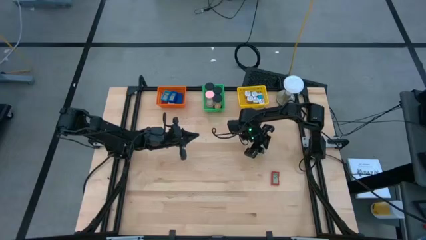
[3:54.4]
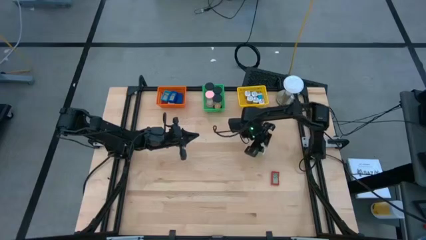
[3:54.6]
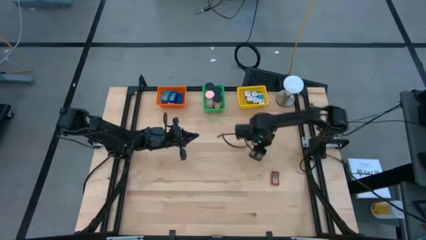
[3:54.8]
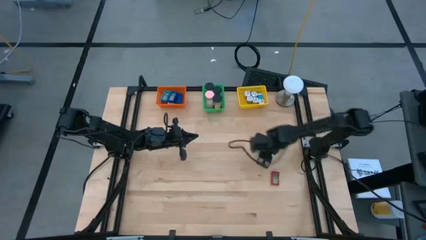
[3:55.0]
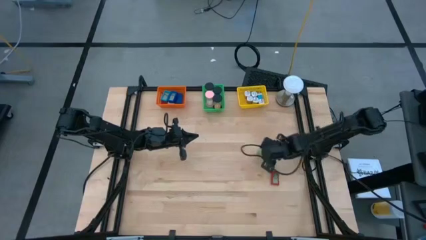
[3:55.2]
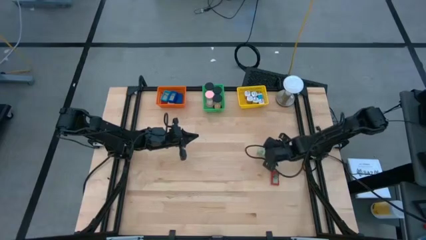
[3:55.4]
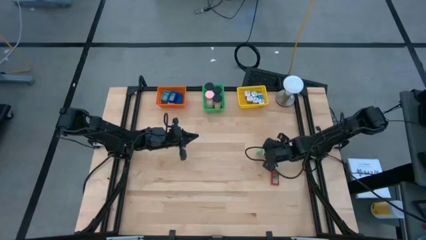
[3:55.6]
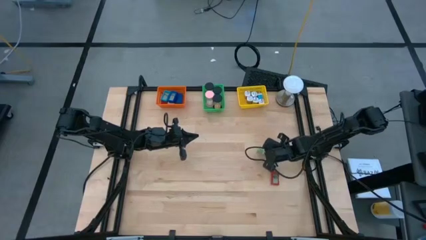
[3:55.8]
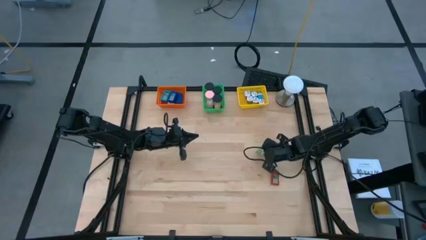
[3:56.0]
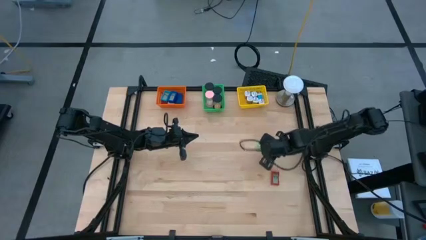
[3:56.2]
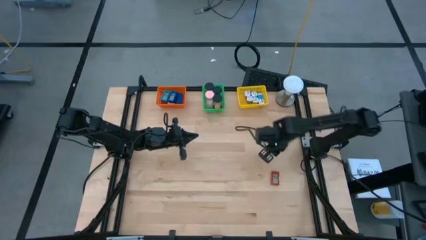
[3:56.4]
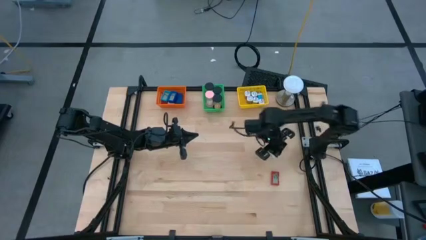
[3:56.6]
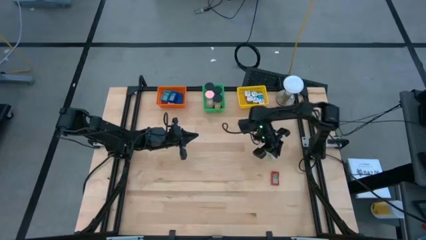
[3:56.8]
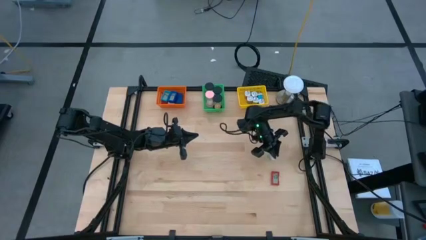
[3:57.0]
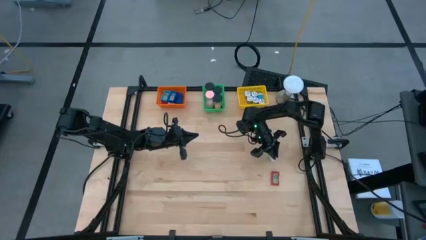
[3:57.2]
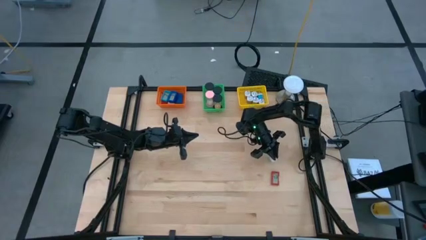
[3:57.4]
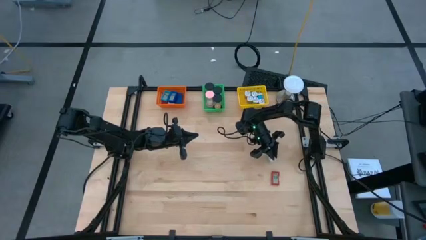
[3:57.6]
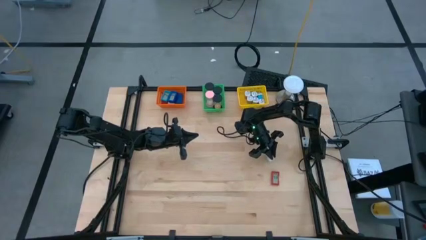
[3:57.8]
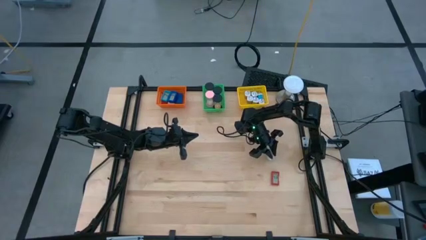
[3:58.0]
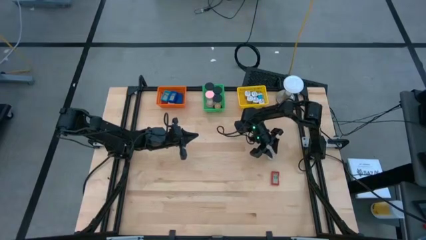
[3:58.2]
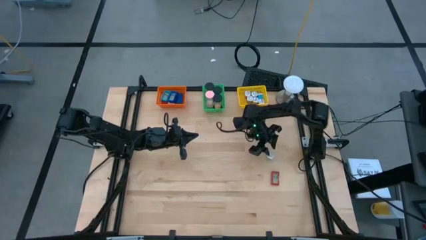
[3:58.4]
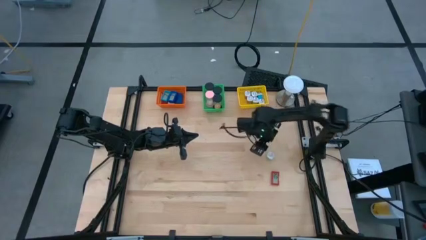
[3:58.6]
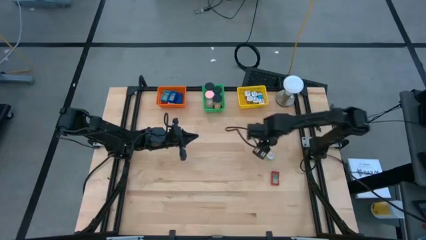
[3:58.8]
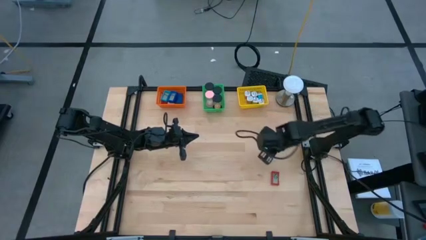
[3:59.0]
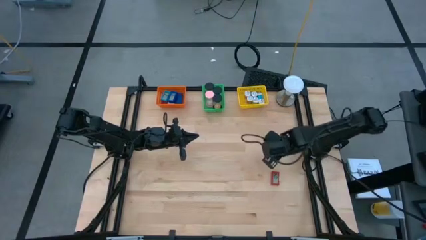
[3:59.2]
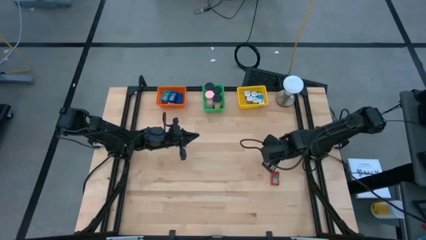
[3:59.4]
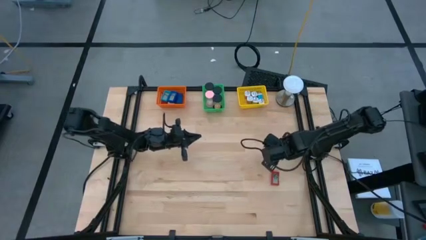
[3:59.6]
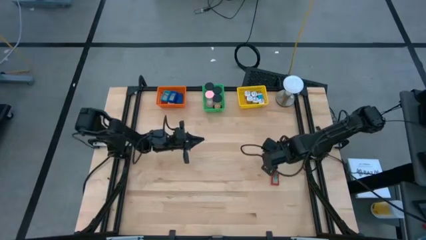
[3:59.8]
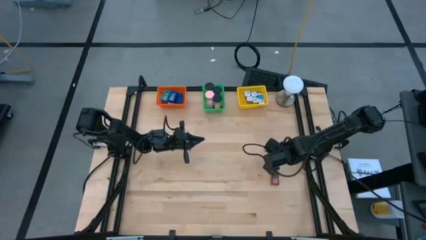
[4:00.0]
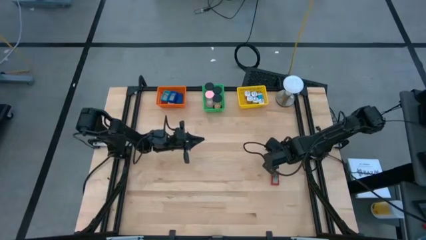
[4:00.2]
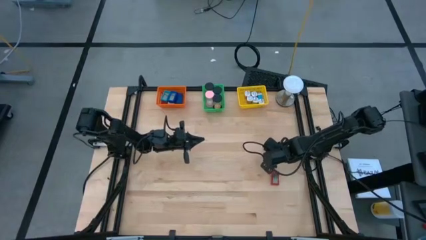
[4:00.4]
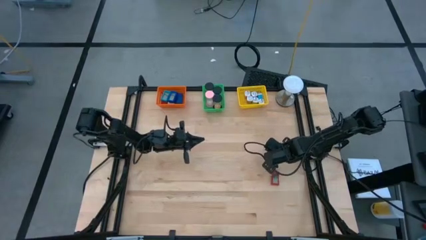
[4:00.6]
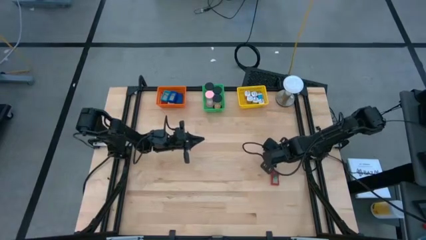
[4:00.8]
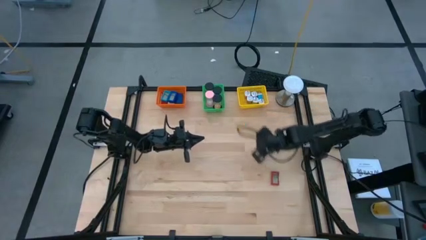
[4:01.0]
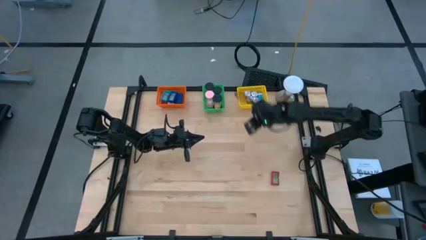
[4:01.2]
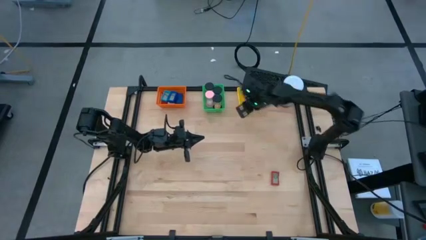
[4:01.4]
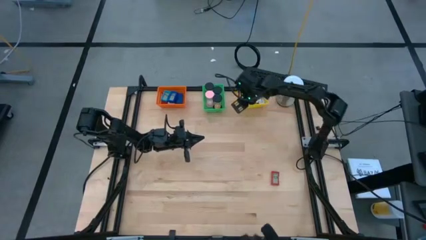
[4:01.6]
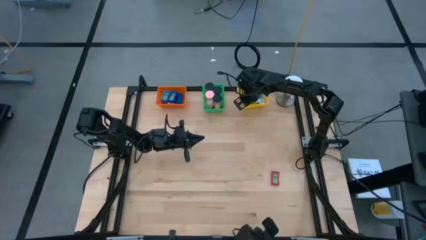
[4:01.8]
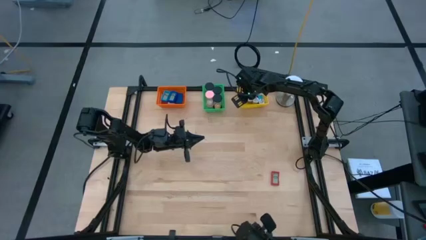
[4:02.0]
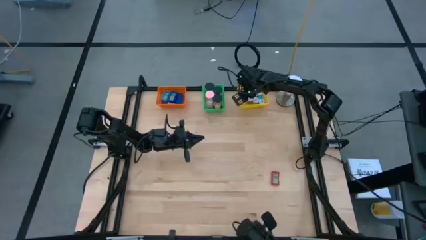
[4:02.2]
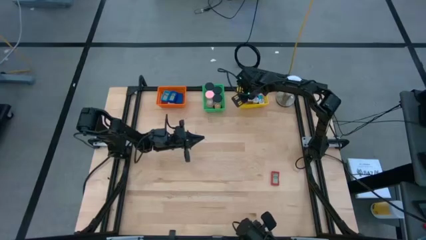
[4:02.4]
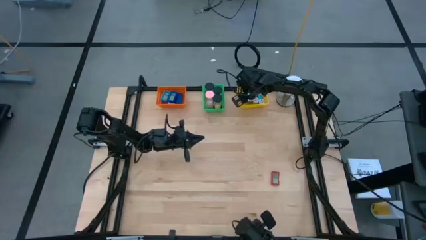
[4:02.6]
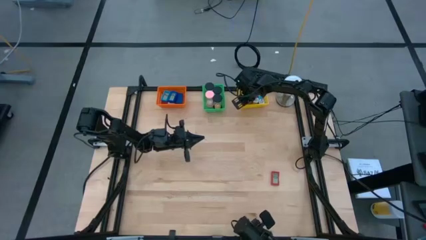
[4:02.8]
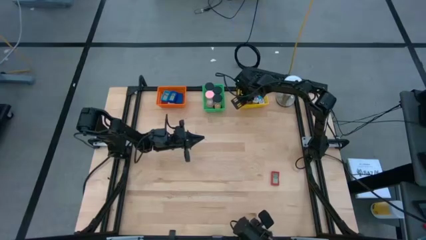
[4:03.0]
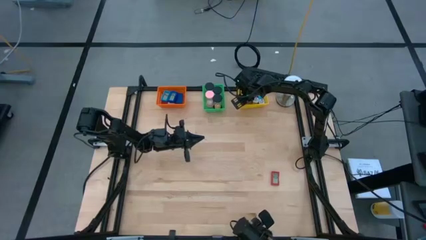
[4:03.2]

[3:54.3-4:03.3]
Task: Pick & Place Office items
Put the green charger adapter into the yellow bin

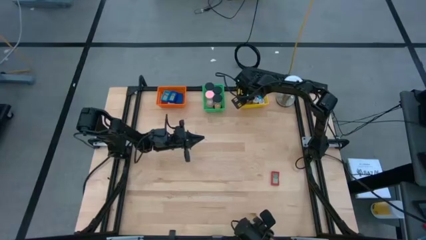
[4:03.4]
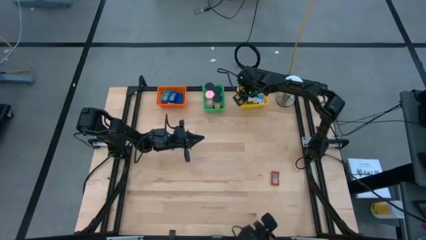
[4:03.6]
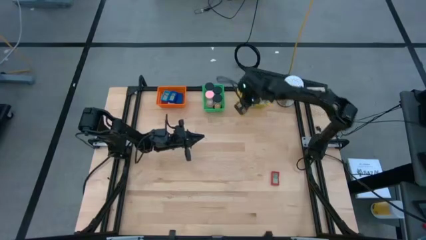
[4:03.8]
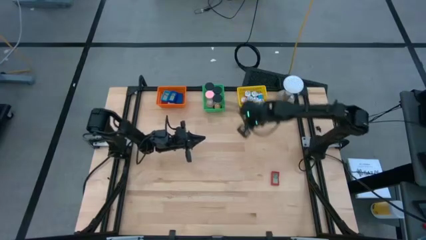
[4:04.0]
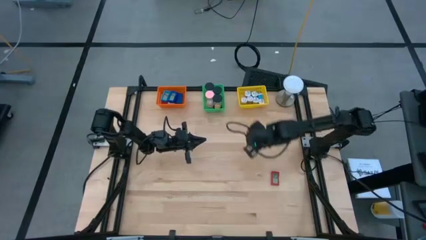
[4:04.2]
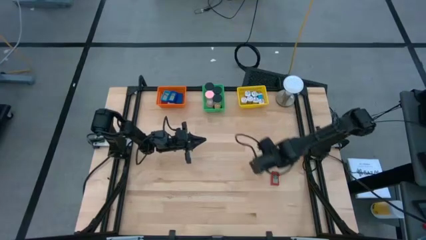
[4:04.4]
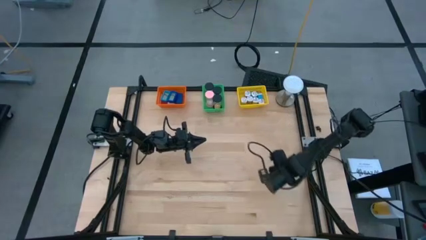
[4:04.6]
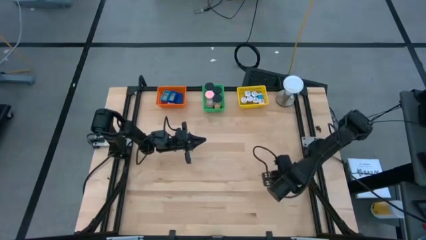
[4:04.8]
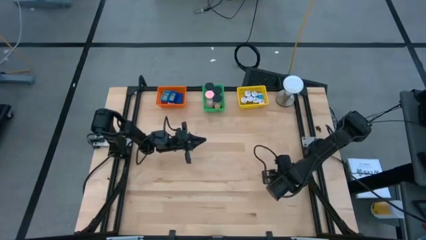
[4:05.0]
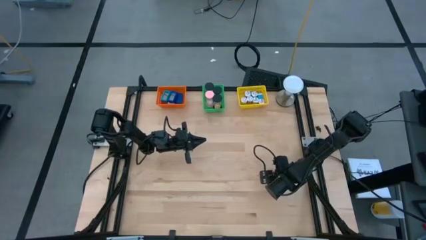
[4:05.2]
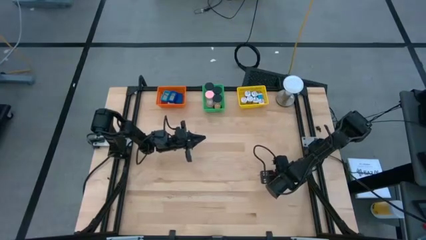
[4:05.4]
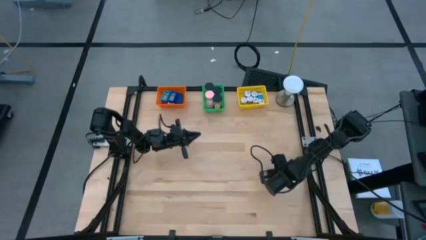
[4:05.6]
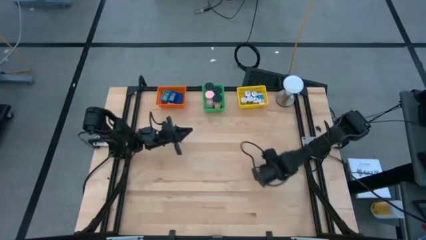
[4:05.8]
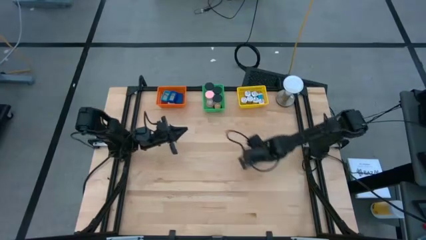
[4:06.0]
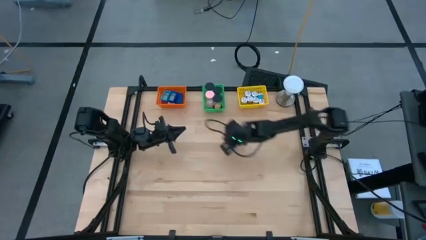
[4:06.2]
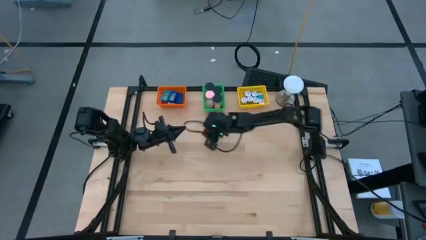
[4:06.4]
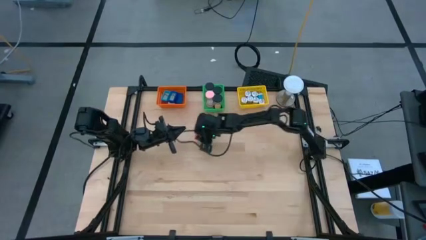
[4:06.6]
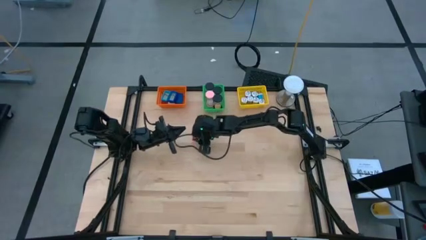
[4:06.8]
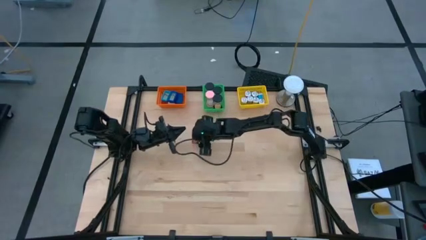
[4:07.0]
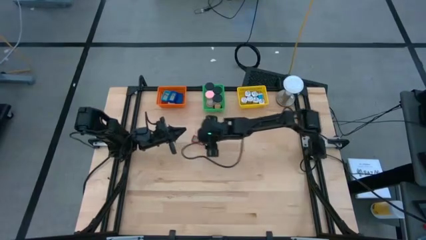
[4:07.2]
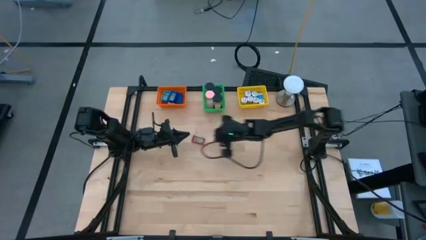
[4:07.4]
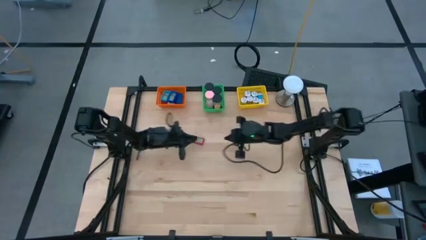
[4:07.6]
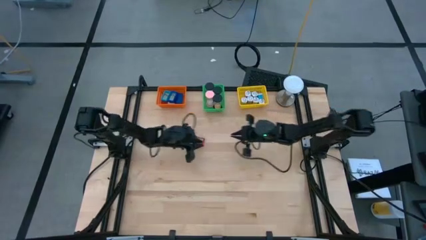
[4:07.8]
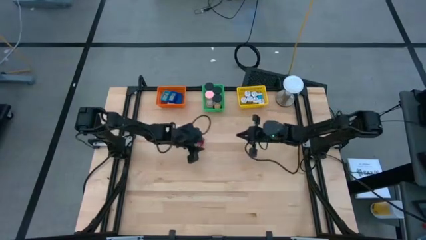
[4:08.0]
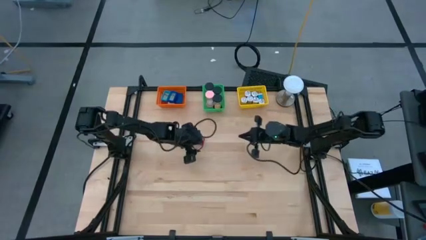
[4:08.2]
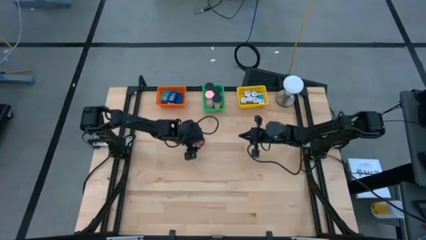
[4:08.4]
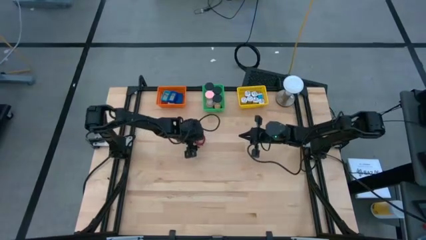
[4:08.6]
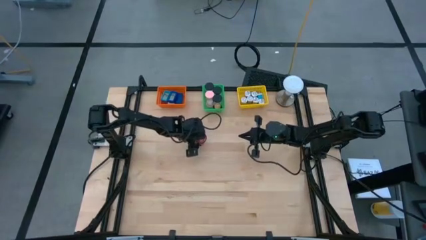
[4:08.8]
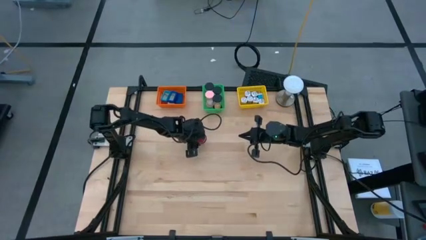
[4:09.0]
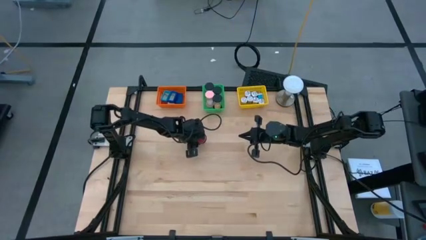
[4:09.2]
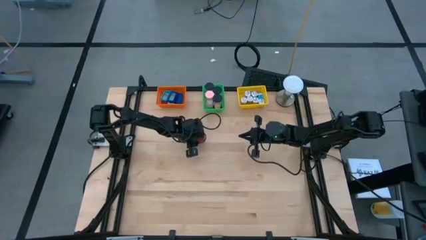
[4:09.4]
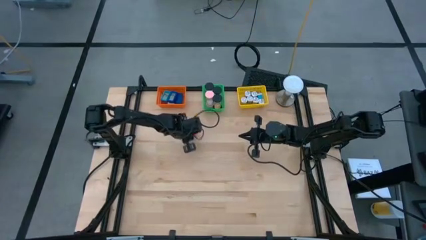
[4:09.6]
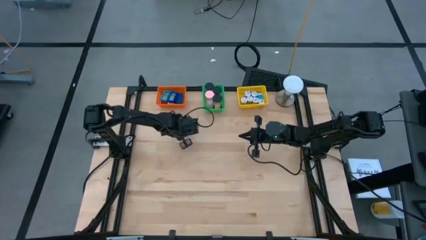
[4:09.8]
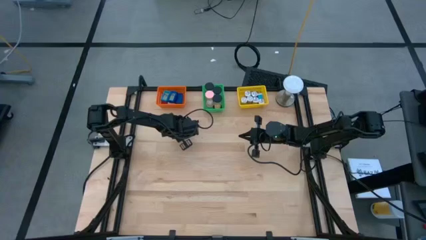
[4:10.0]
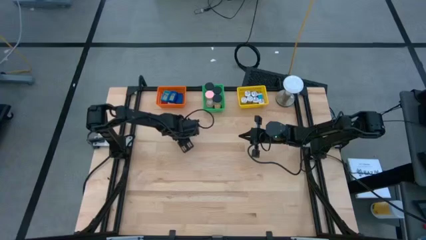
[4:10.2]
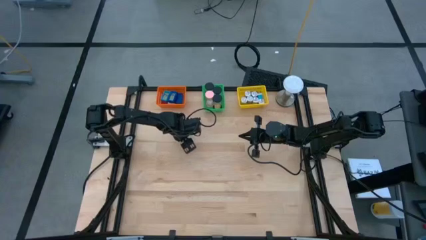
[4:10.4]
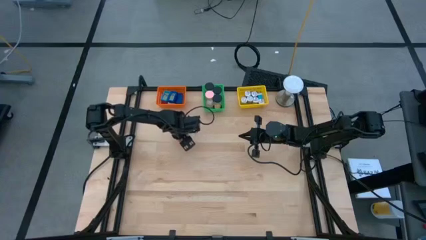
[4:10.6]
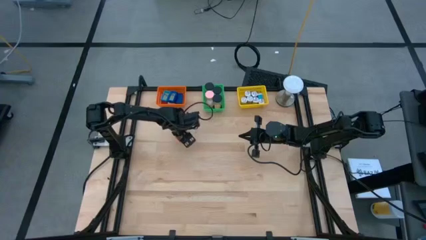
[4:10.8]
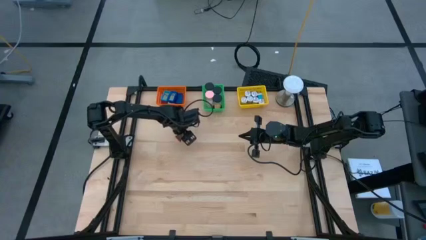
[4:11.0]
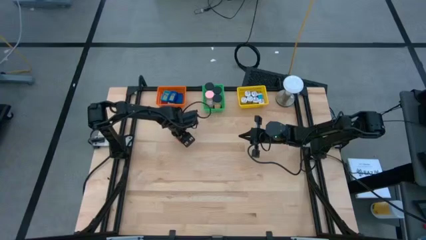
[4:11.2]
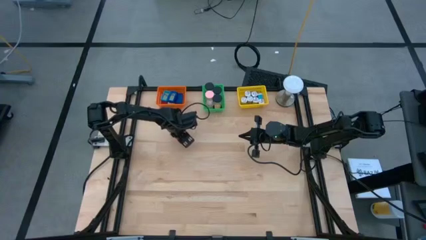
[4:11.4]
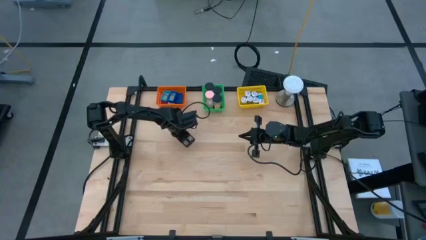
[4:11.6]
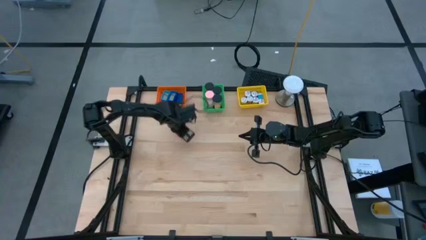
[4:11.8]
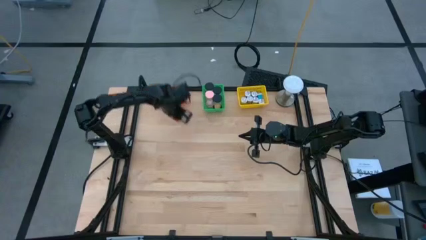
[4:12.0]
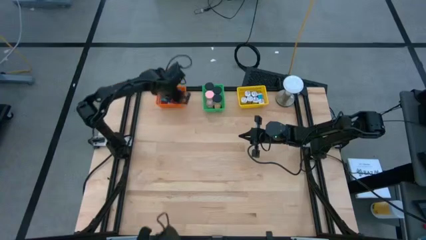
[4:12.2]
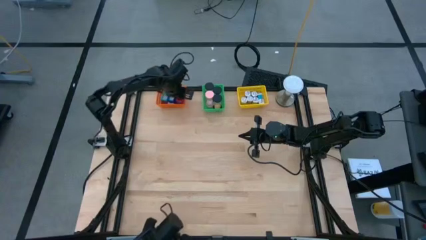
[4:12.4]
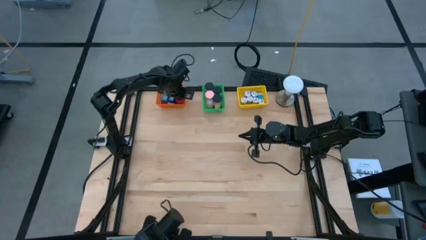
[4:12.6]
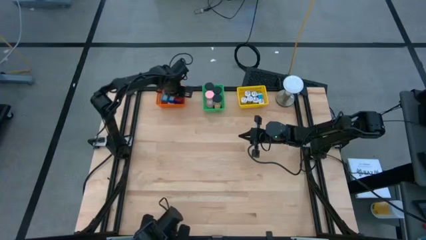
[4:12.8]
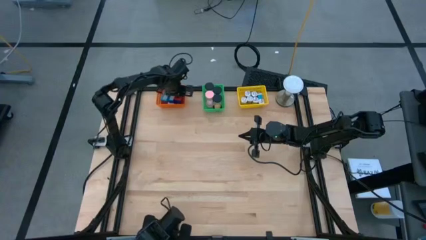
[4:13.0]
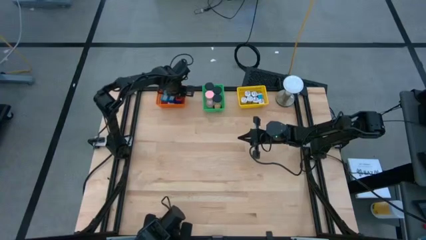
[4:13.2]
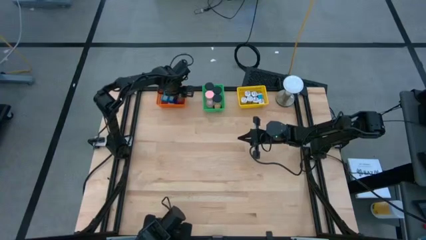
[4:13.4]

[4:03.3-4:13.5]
Put the red digital clock into the orange bin
